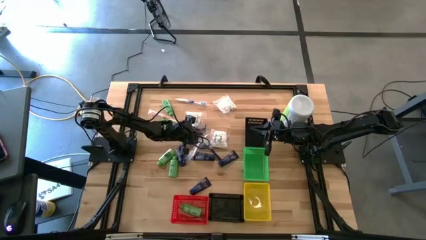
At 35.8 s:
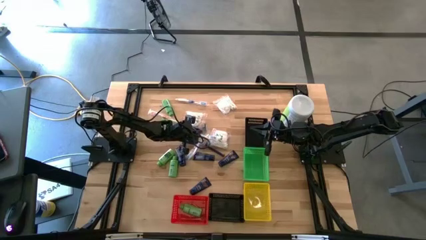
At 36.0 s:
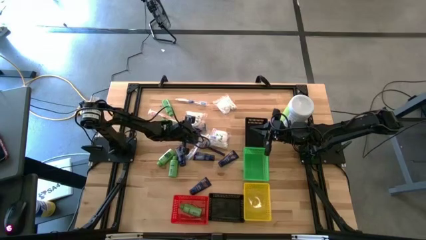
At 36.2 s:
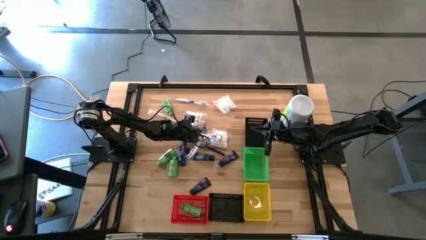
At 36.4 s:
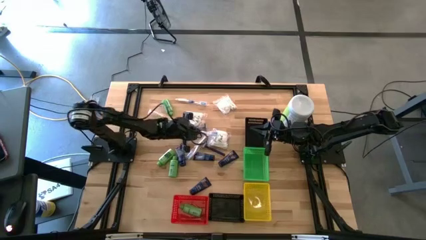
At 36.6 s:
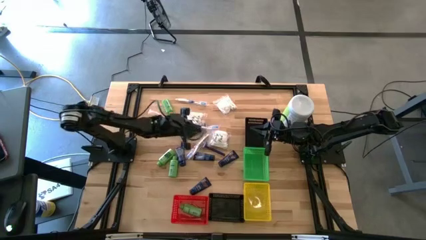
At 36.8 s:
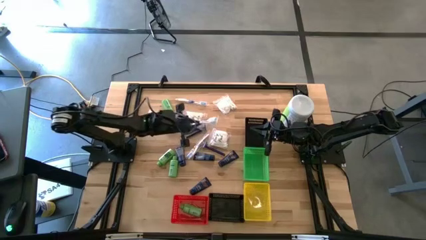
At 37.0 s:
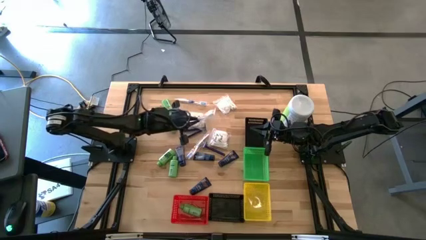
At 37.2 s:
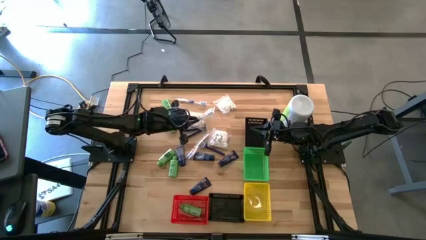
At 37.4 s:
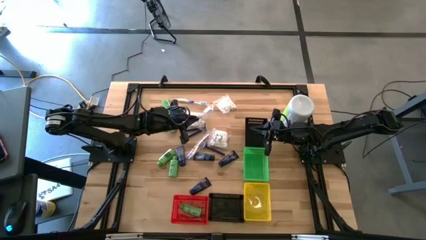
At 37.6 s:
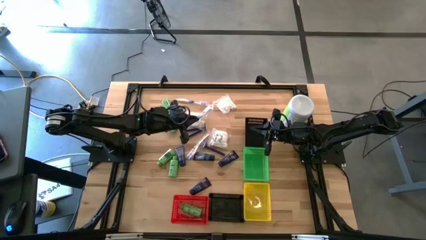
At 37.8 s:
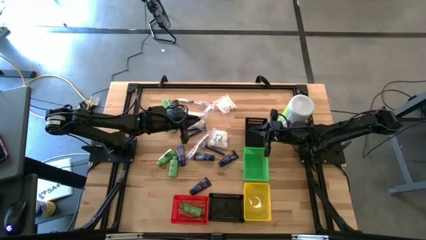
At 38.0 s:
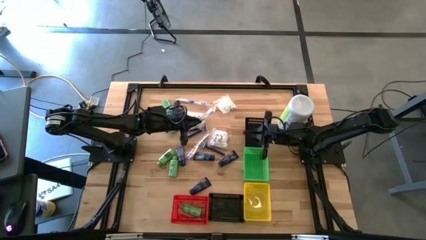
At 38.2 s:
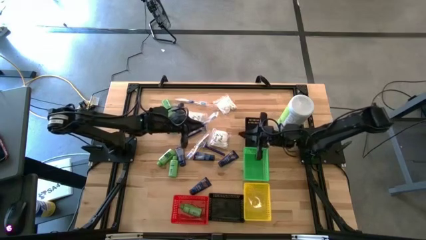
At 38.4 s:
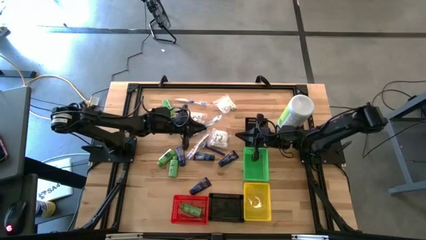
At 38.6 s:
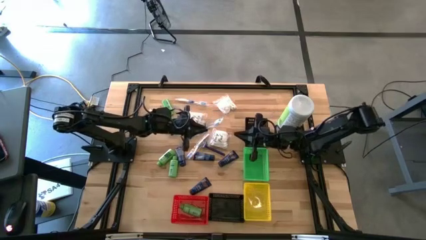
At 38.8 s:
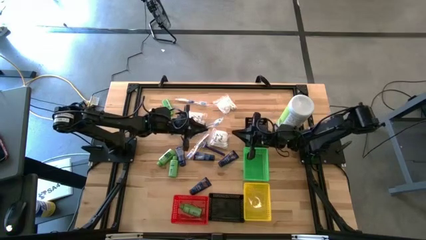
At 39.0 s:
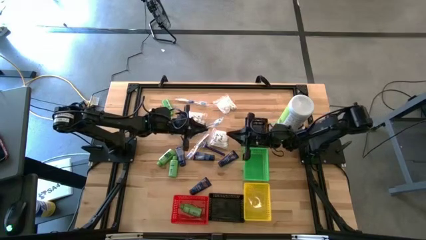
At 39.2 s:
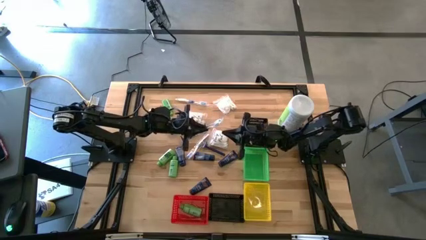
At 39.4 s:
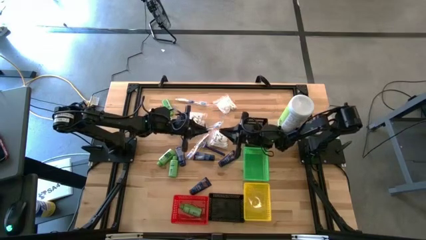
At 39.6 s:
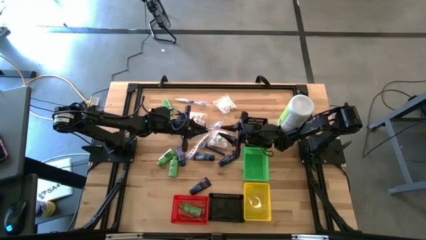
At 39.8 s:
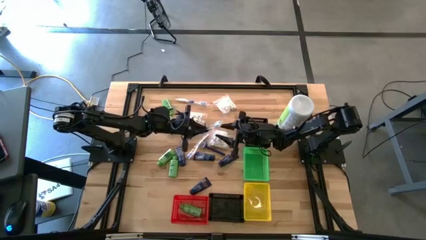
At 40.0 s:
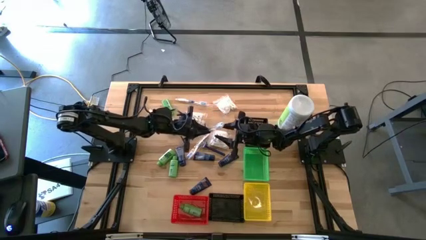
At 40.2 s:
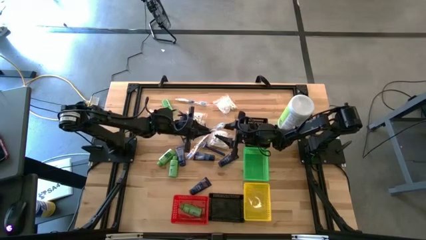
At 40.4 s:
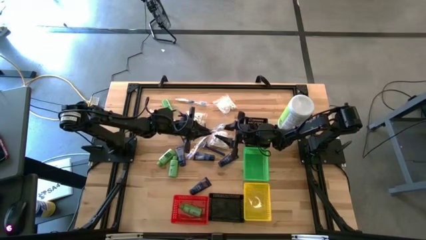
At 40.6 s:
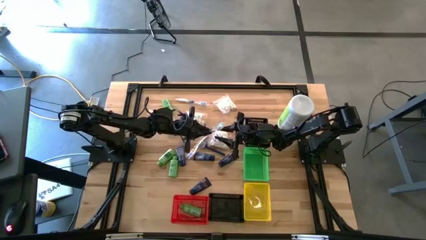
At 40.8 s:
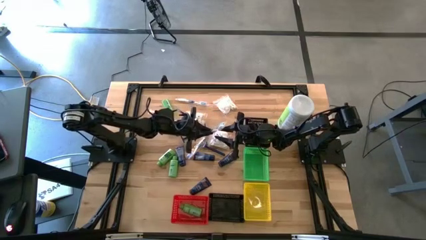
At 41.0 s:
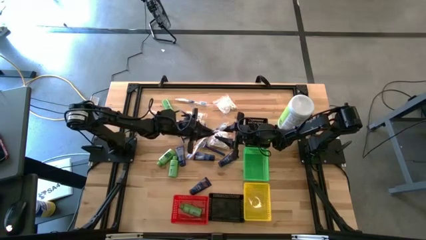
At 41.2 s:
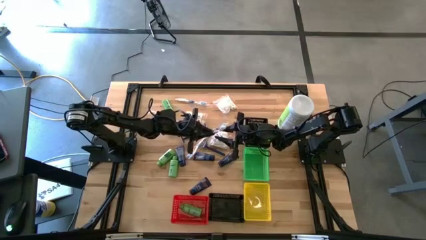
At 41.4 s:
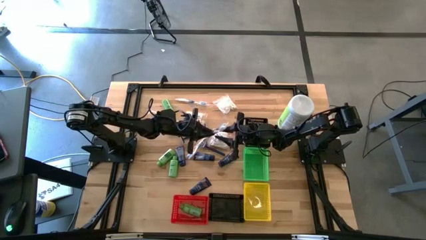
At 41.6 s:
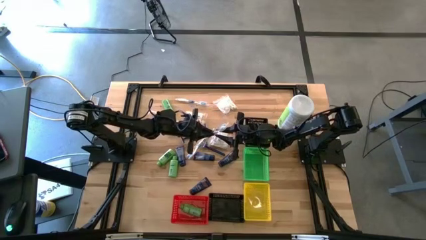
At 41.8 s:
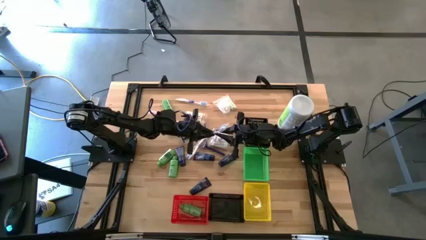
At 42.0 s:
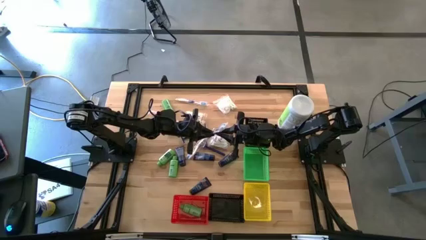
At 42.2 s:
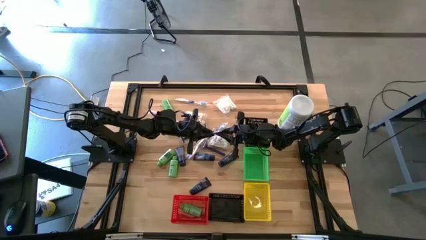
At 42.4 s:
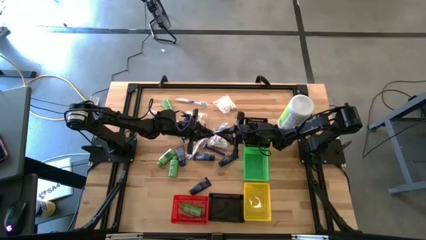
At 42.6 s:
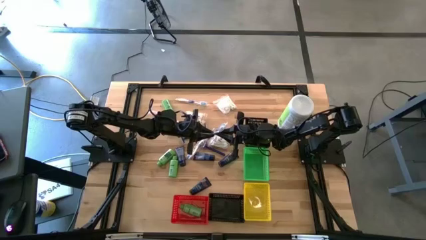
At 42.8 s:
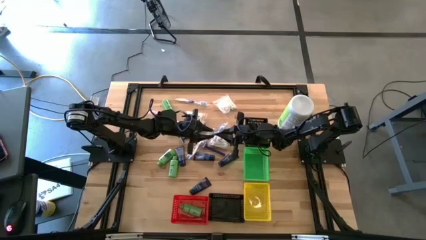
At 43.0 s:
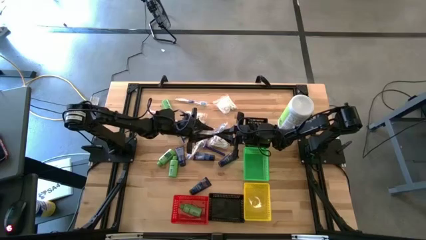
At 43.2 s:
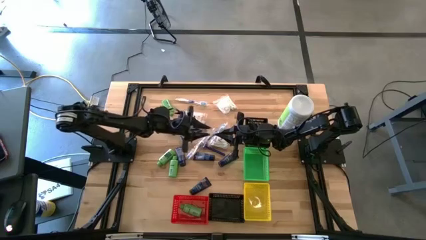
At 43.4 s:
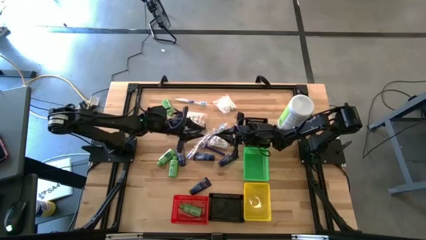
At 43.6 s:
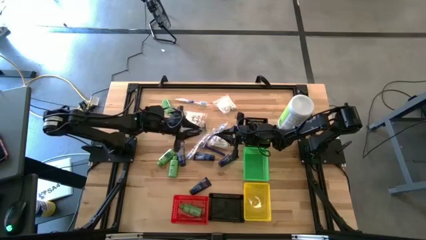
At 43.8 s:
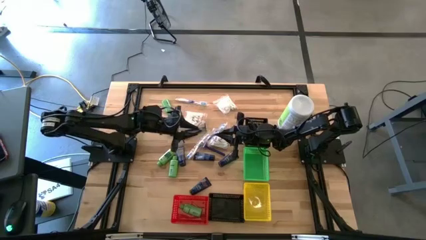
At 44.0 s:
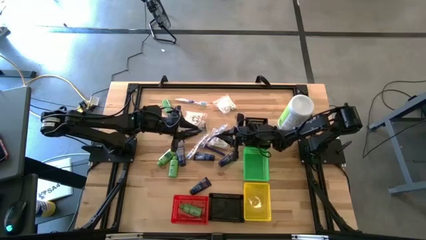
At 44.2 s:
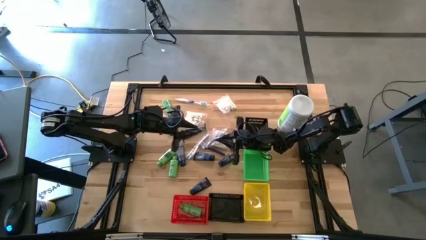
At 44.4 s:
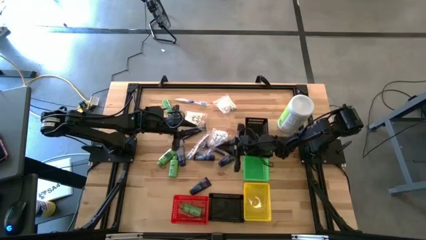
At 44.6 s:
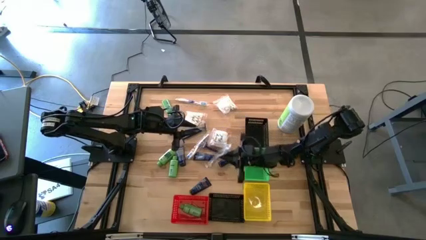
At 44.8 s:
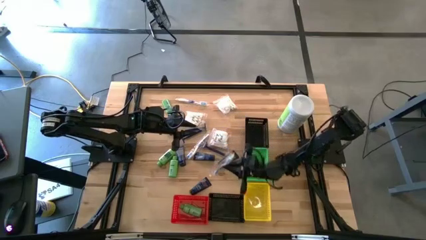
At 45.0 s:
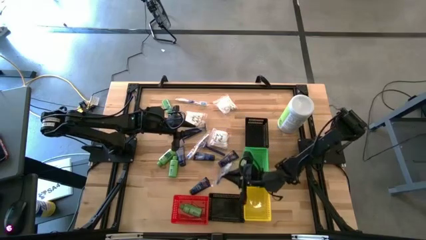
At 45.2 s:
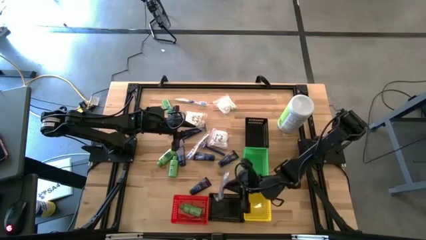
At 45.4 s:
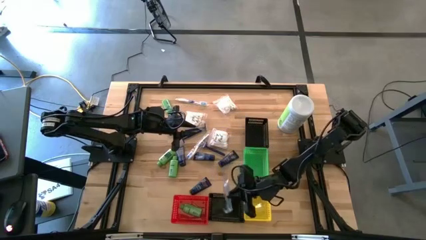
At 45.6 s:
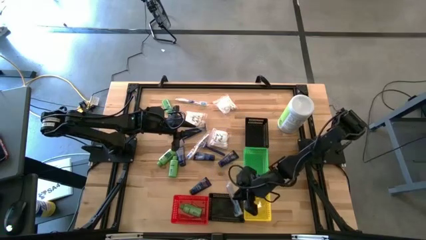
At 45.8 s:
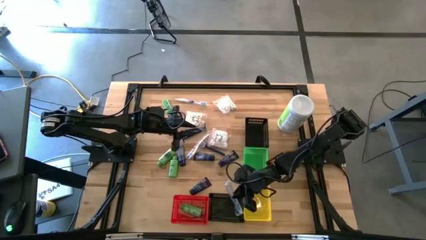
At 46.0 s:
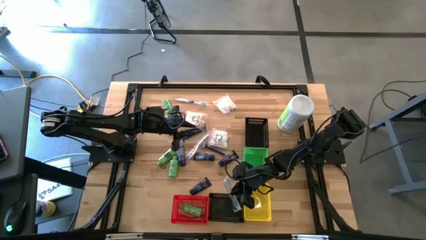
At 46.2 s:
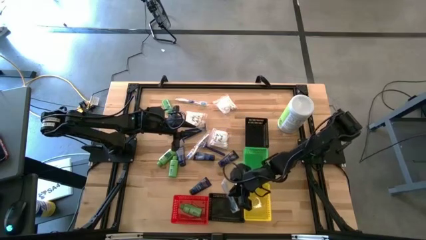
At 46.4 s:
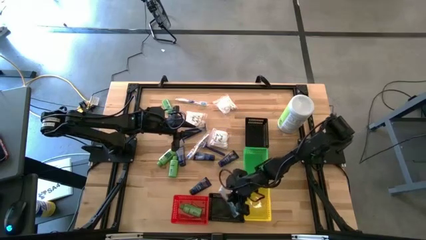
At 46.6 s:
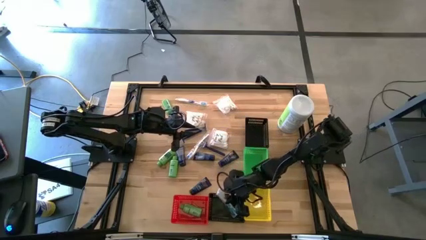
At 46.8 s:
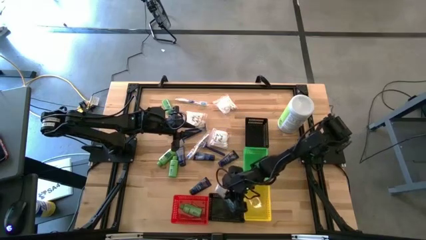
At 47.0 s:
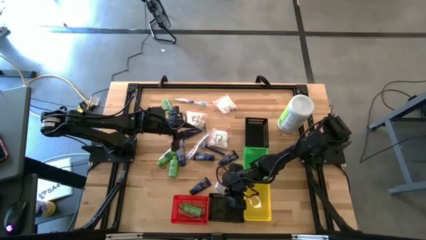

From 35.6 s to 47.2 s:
Task: Pick & Place Travel size toiletries
Put the top blue toothbrush into the bottom black bin
